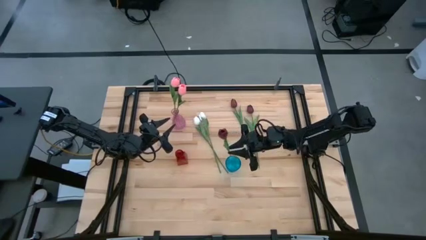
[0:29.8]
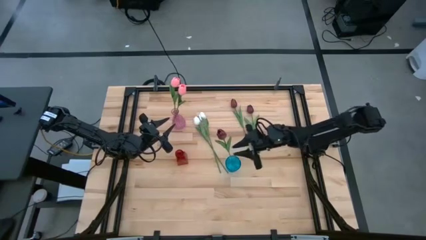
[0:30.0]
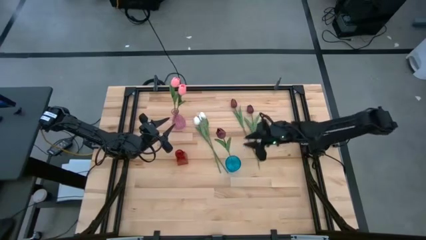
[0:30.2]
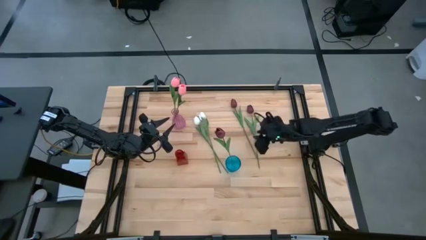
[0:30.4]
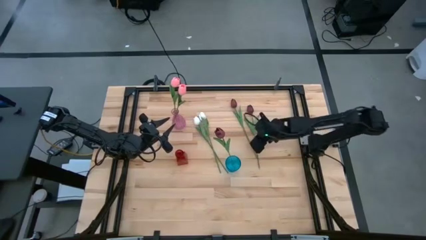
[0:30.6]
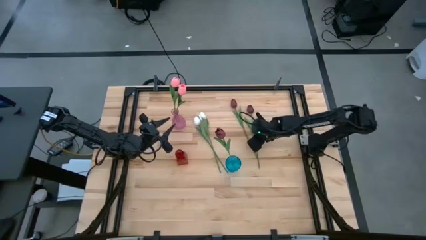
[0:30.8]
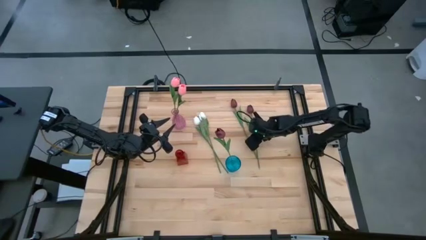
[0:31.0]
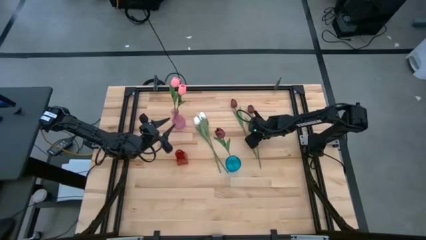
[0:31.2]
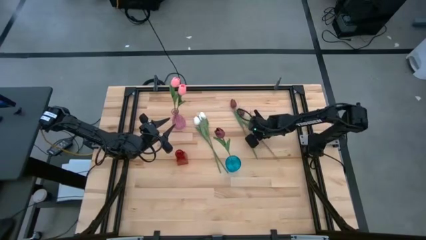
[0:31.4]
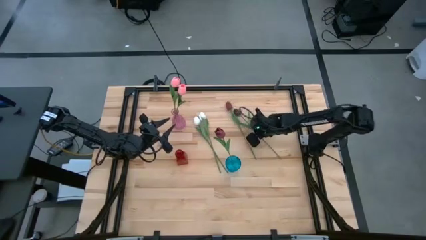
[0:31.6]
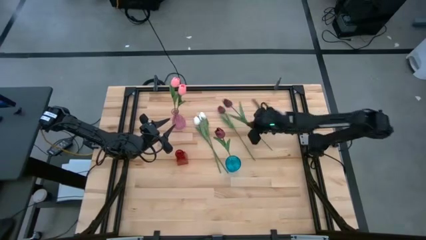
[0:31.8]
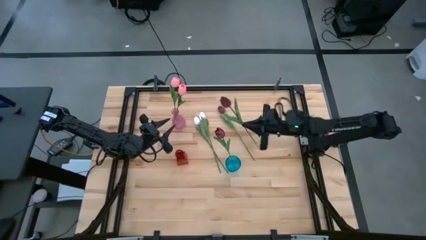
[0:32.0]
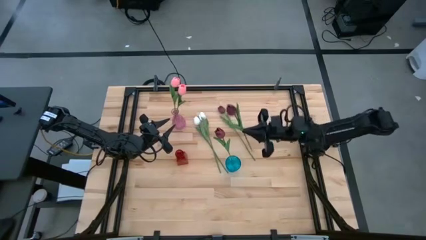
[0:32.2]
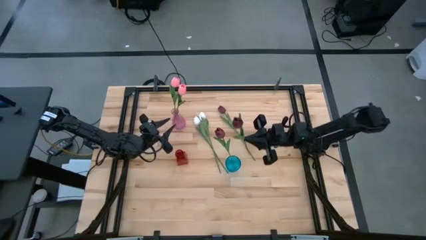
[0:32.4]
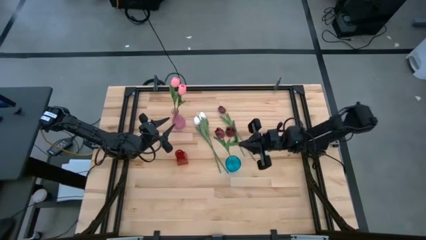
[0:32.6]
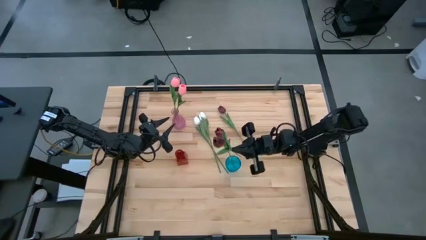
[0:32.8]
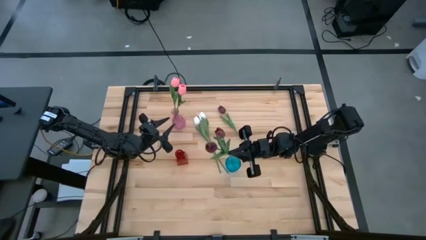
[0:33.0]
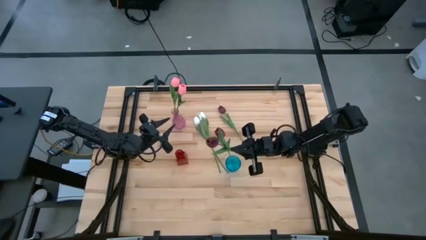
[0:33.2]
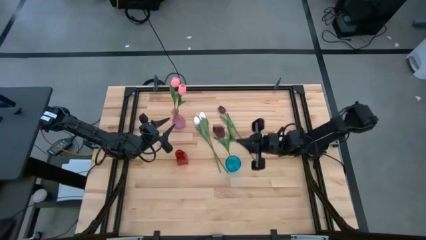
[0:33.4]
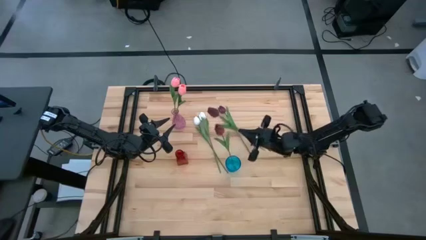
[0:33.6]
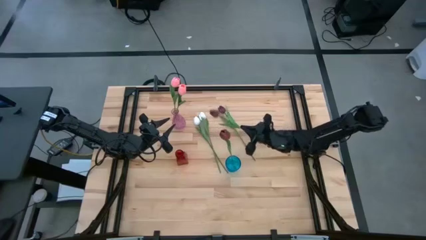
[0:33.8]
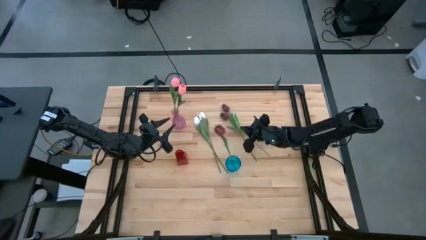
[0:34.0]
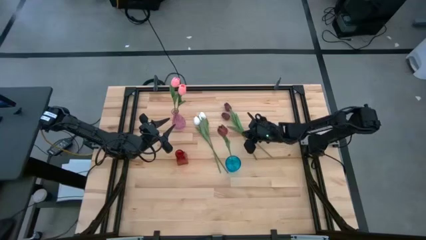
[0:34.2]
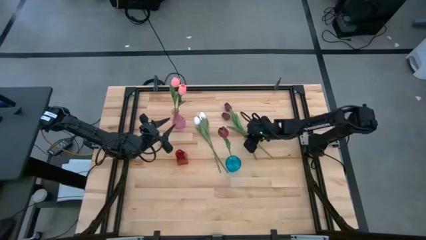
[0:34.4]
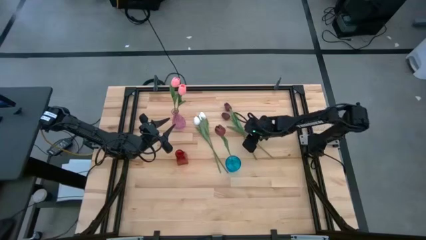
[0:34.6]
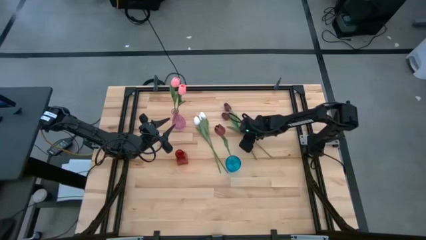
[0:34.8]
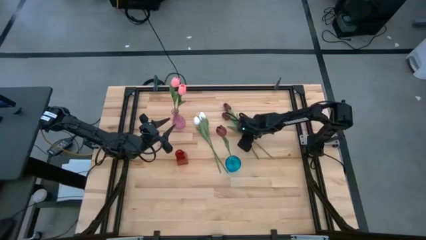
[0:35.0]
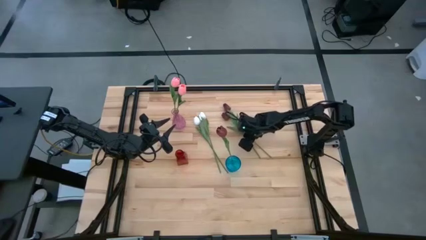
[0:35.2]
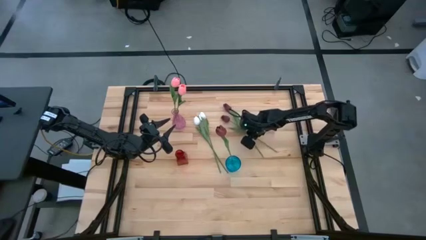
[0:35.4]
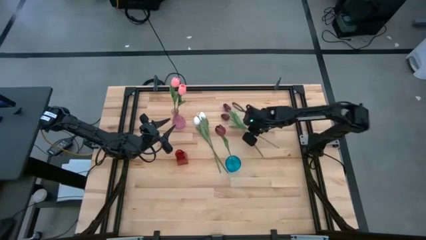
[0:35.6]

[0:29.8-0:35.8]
Task: Sort flowers into vase by color
Put the right red flower into the blue vase

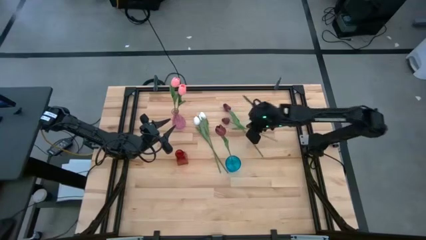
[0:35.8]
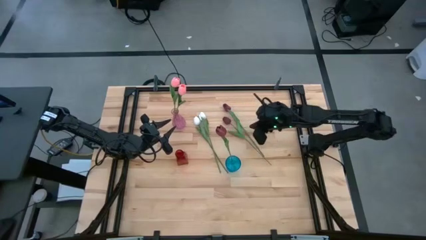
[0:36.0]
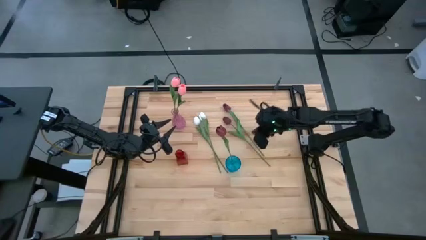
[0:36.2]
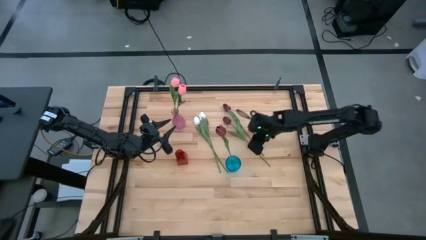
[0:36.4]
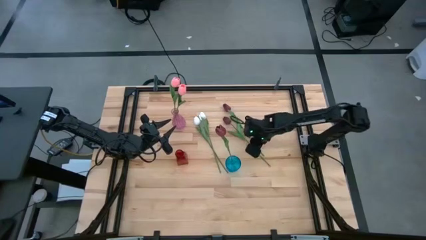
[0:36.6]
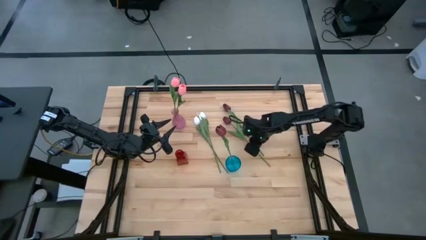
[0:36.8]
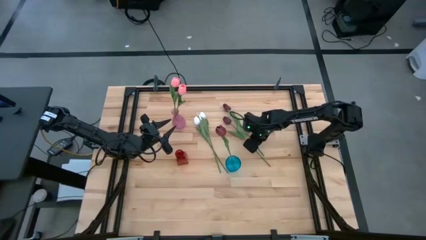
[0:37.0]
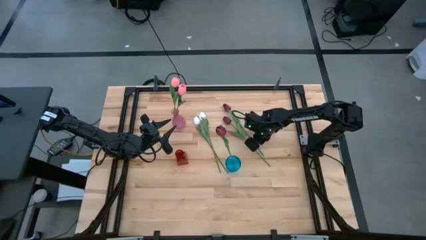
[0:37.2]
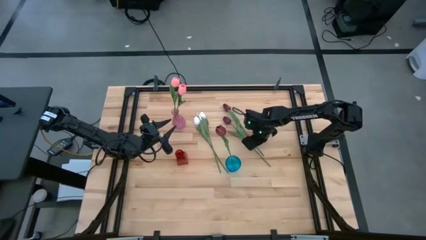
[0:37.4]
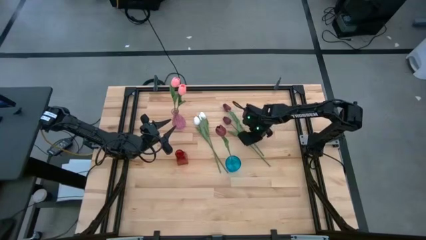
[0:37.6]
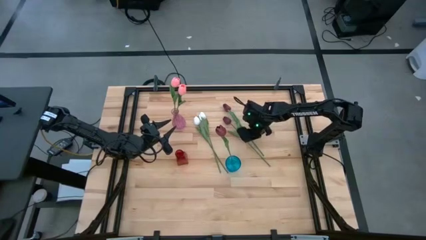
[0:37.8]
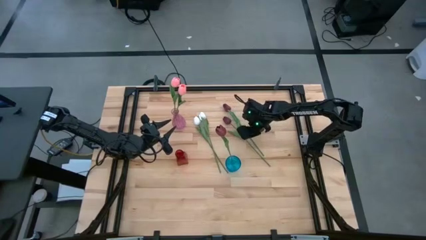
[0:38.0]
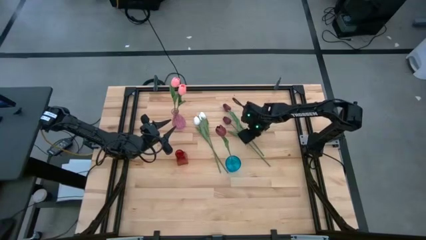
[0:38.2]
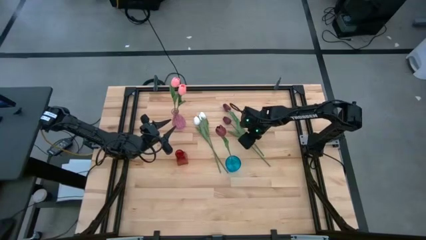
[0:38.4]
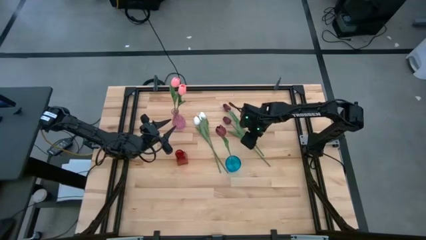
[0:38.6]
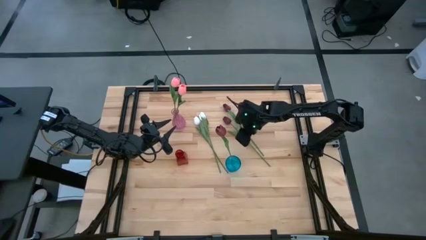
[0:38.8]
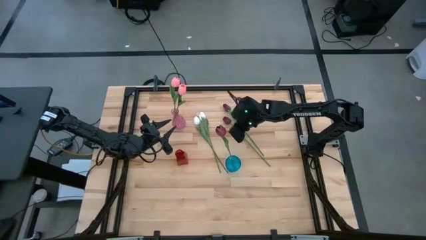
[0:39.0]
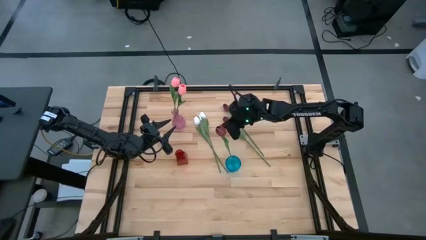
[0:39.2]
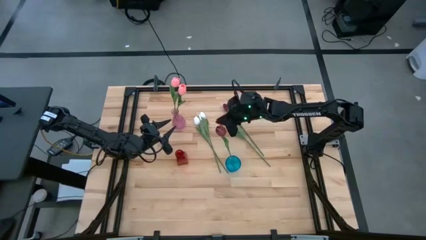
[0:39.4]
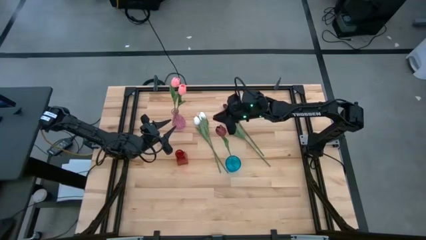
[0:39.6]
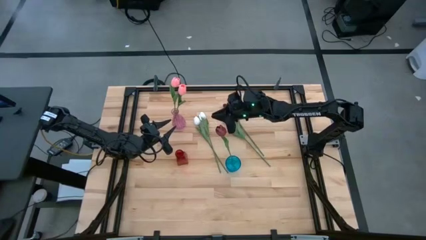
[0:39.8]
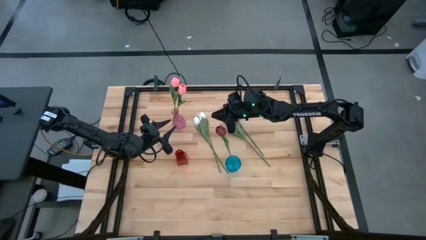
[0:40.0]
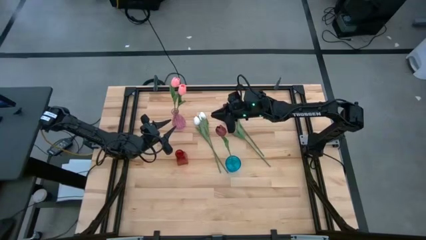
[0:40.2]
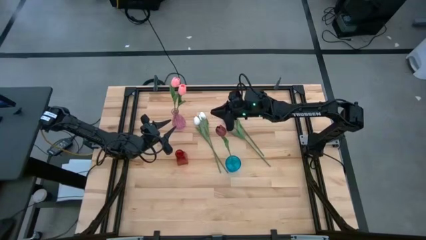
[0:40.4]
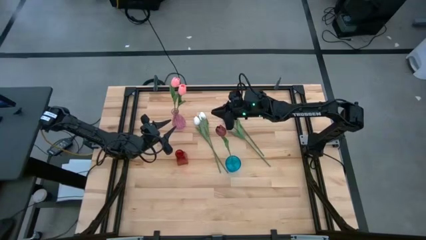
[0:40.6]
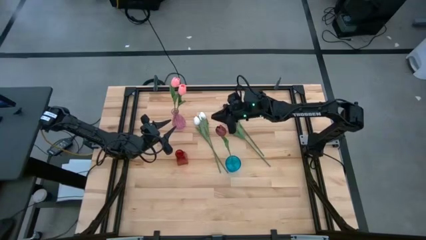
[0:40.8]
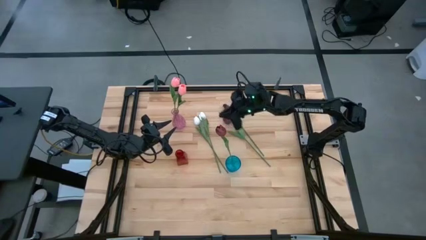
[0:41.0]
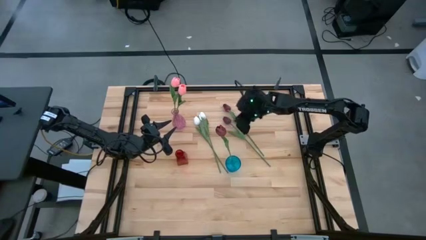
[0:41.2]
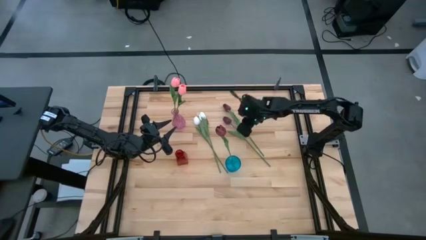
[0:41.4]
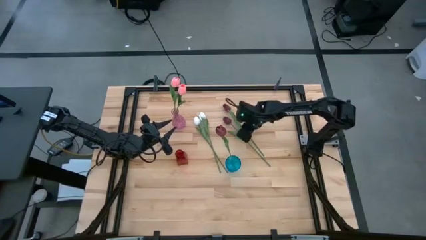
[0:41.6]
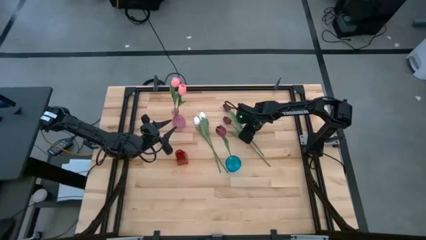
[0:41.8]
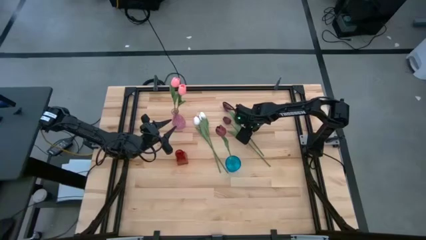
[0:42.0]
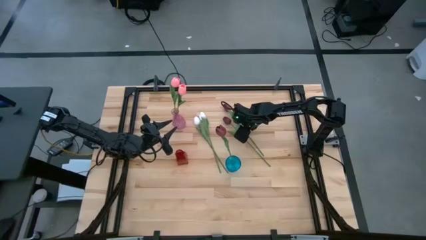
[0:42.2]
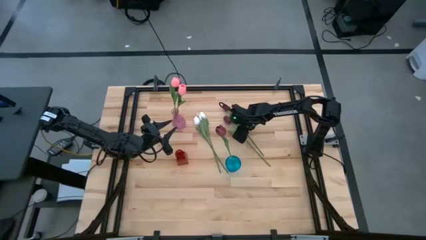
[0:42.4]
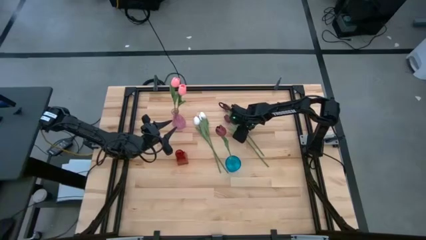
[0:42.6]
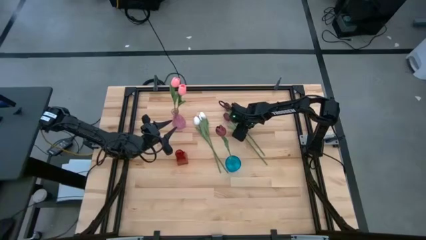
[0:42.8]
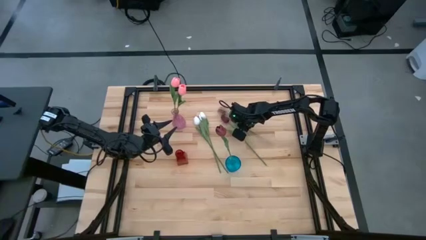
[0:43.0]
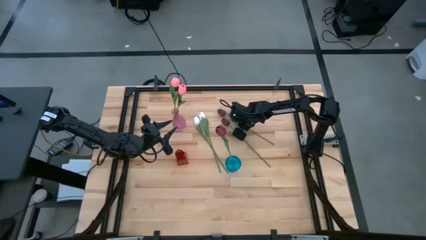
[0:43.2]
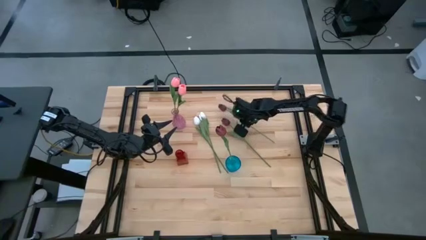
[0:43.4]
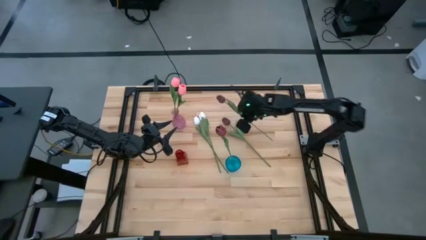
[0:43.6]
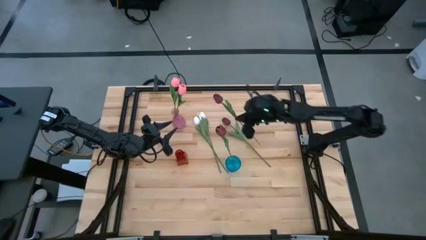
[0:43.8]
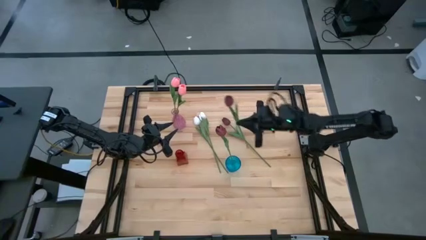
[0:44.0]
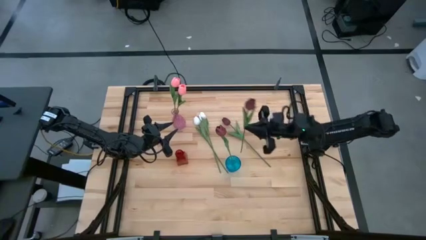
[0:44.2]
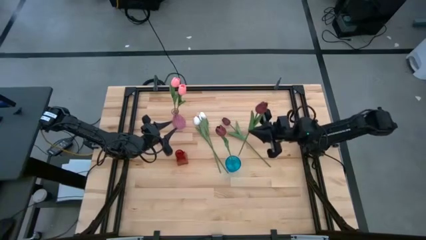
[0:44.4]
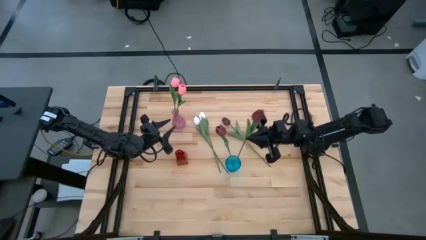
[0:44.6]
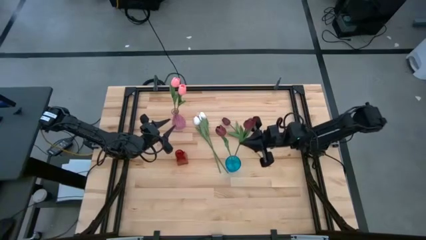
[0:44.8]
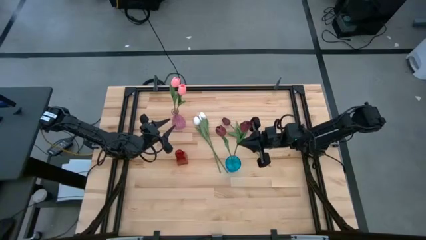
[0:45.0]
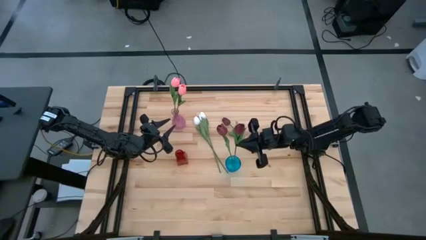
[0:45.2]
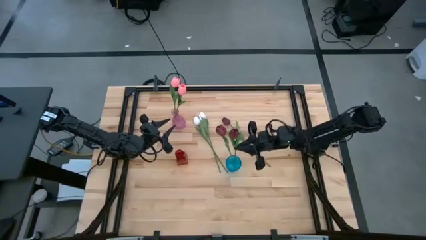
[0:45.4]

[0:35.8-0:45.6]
Put the right red flower into the blue vase
